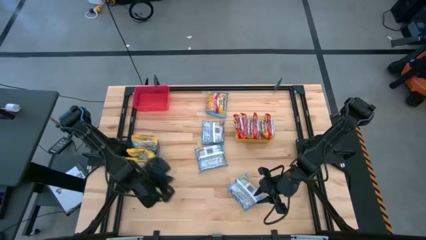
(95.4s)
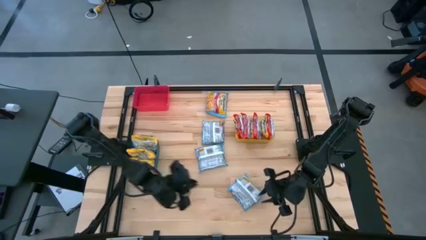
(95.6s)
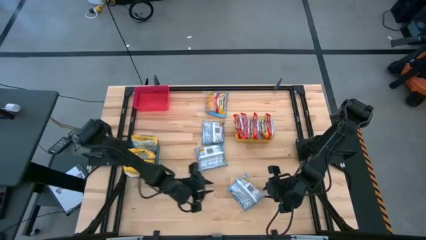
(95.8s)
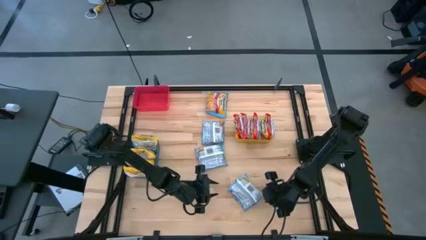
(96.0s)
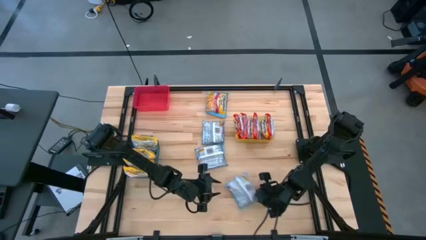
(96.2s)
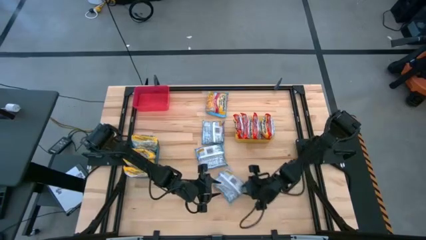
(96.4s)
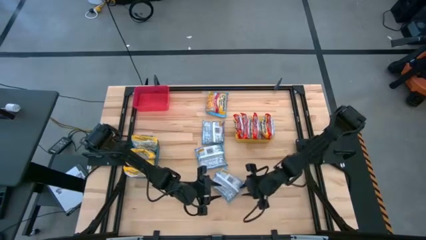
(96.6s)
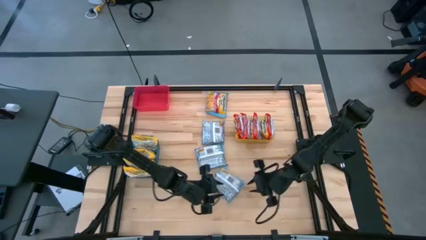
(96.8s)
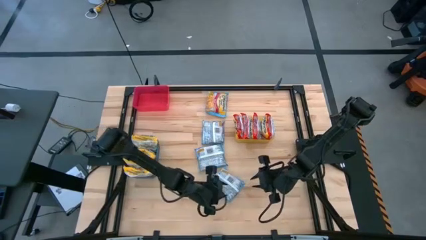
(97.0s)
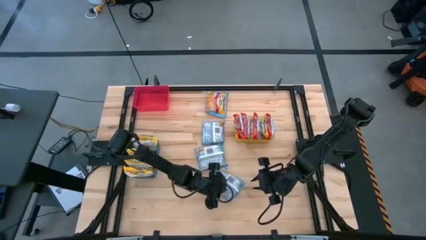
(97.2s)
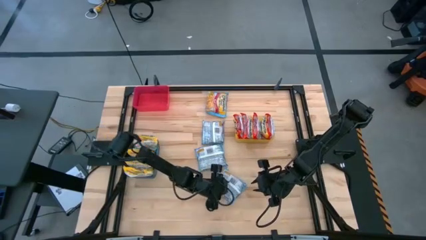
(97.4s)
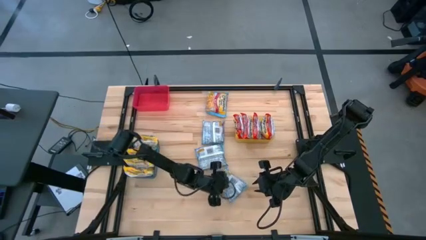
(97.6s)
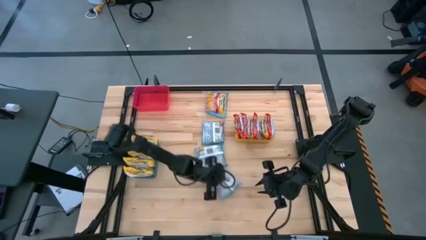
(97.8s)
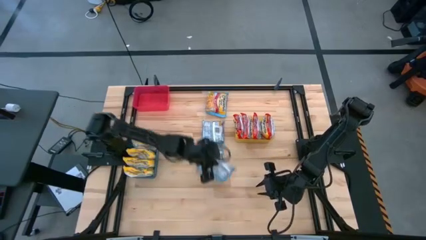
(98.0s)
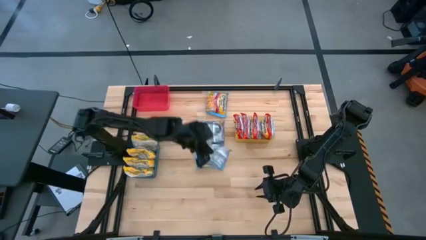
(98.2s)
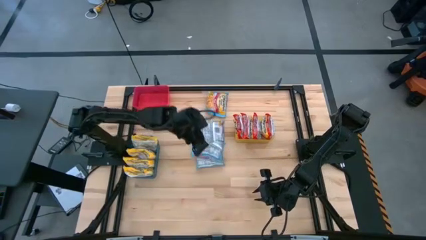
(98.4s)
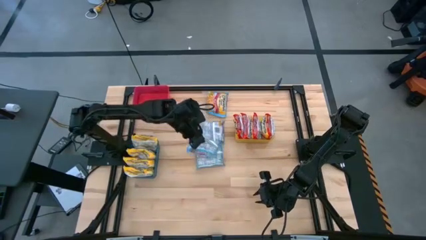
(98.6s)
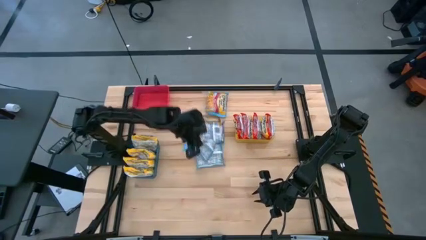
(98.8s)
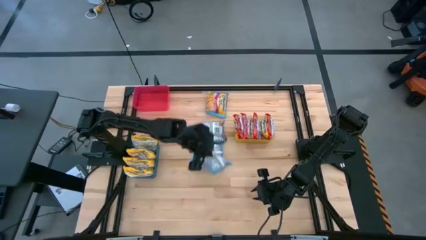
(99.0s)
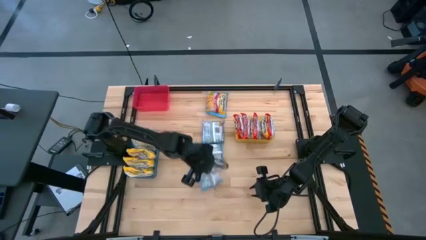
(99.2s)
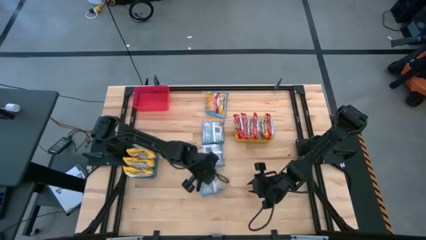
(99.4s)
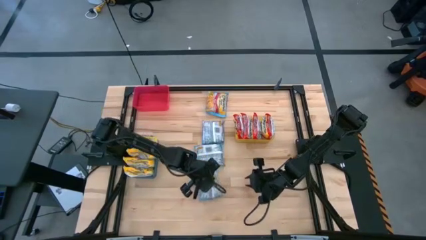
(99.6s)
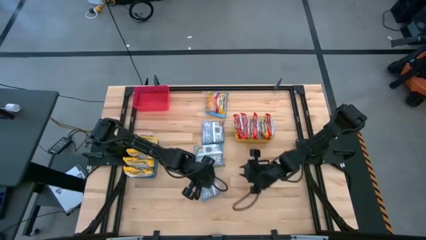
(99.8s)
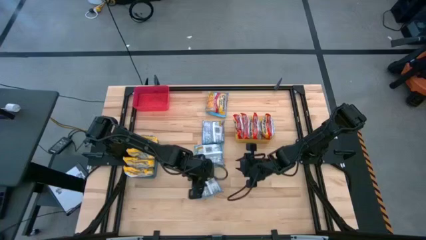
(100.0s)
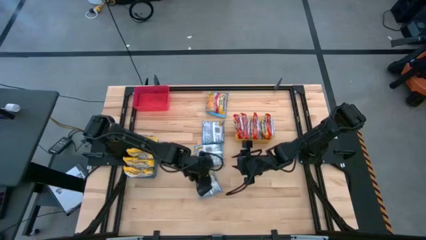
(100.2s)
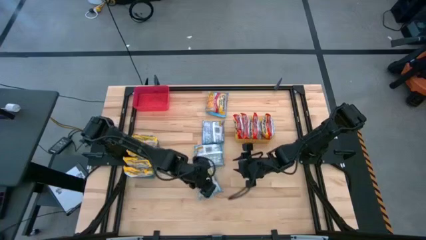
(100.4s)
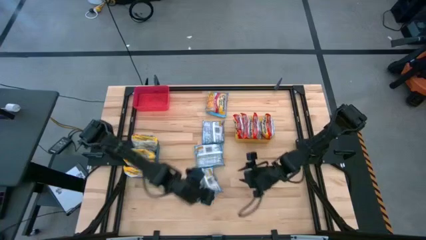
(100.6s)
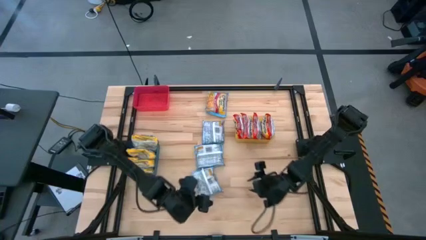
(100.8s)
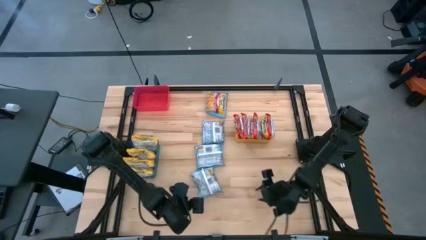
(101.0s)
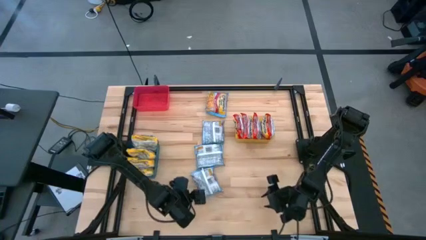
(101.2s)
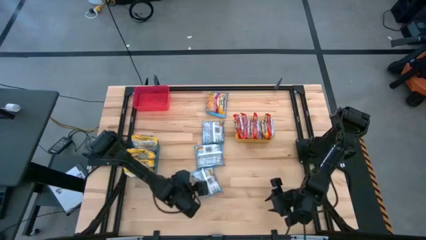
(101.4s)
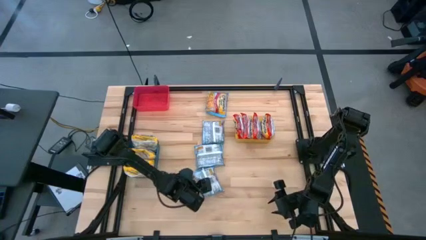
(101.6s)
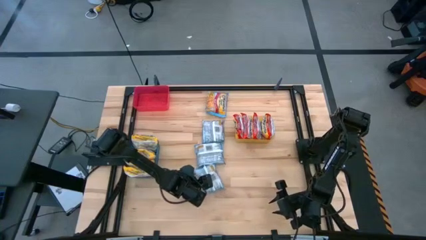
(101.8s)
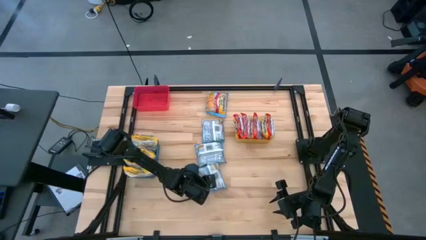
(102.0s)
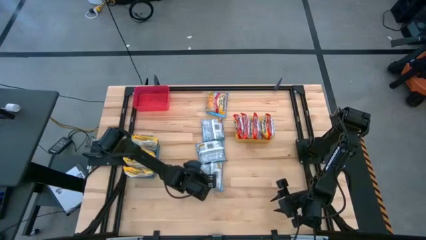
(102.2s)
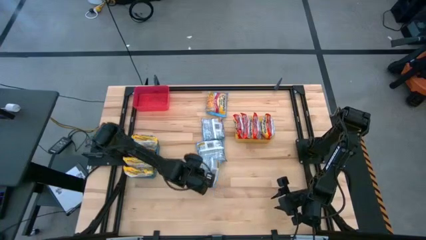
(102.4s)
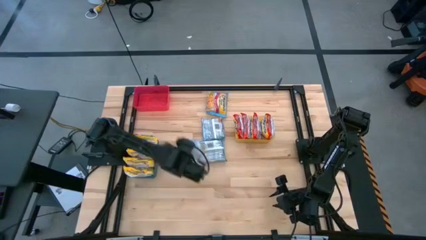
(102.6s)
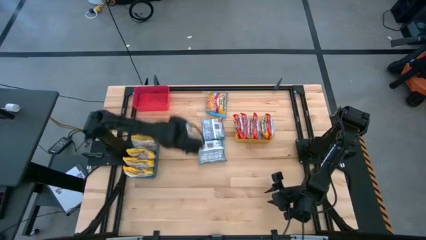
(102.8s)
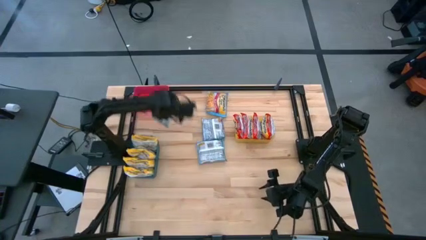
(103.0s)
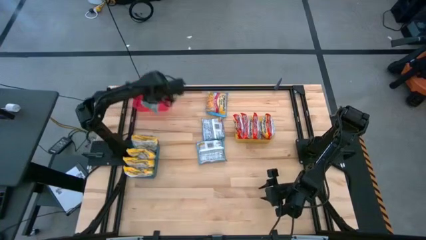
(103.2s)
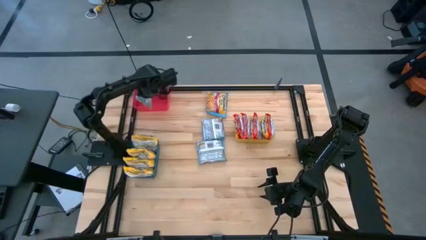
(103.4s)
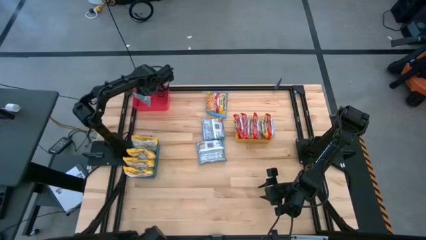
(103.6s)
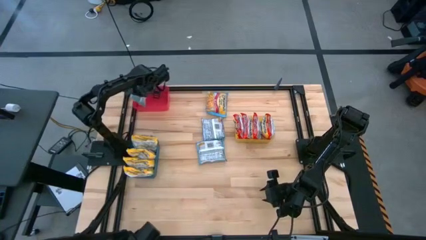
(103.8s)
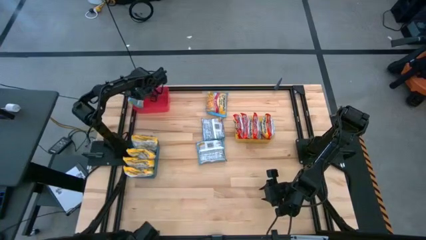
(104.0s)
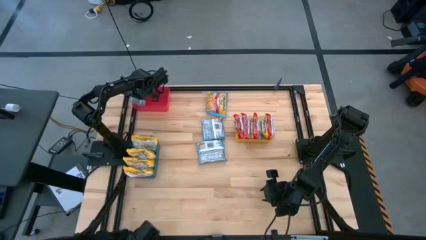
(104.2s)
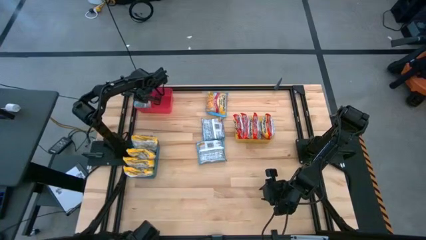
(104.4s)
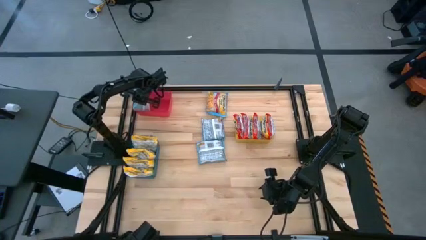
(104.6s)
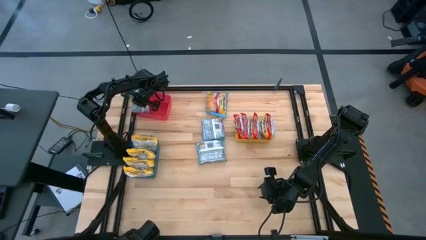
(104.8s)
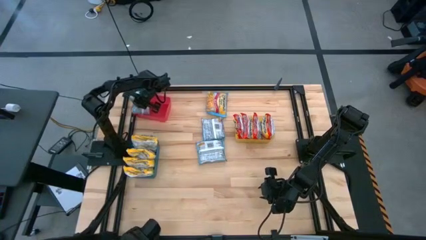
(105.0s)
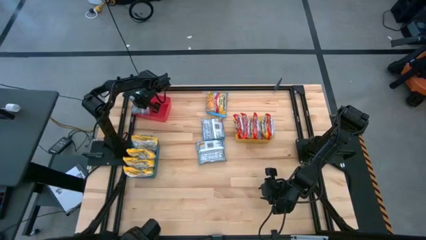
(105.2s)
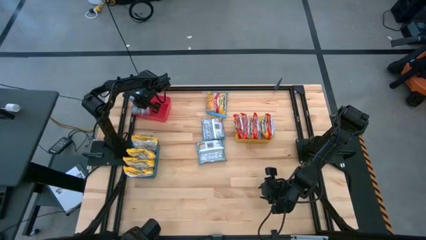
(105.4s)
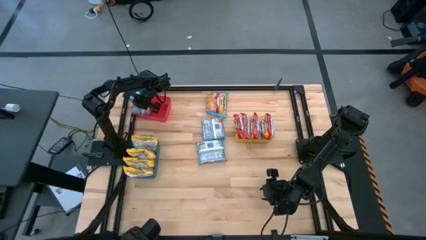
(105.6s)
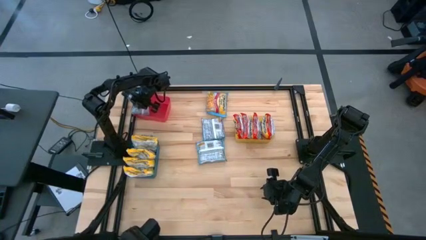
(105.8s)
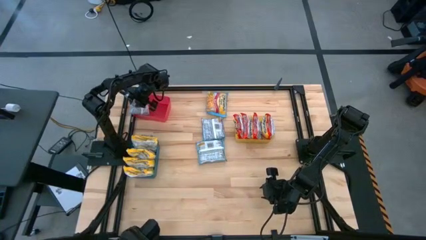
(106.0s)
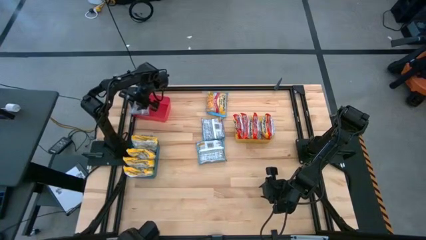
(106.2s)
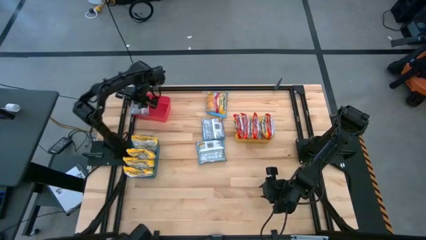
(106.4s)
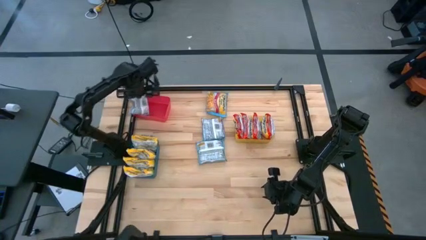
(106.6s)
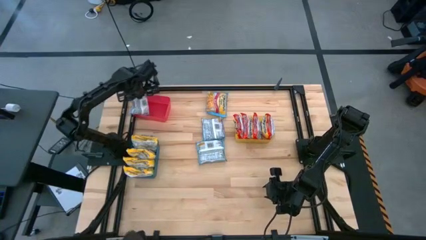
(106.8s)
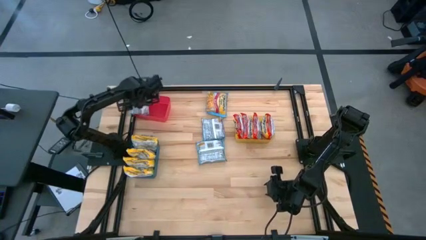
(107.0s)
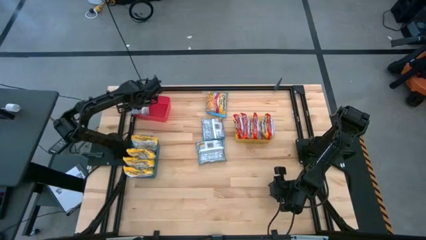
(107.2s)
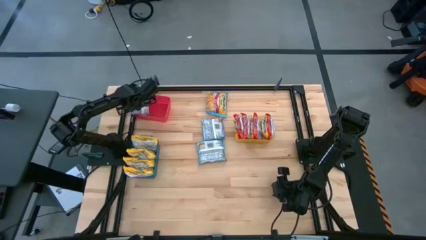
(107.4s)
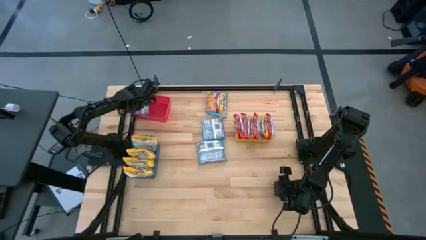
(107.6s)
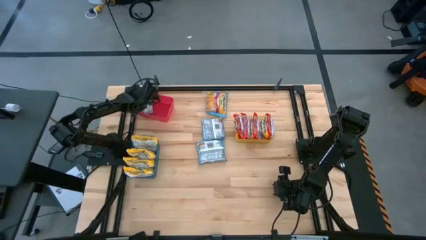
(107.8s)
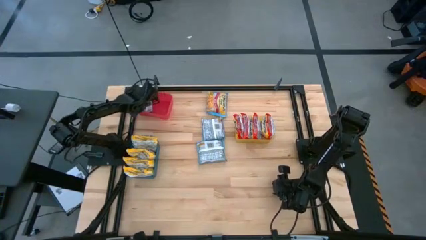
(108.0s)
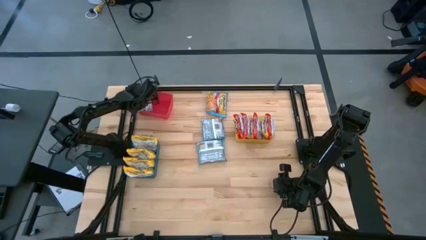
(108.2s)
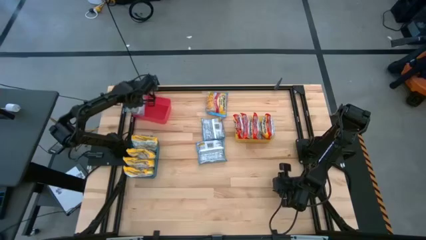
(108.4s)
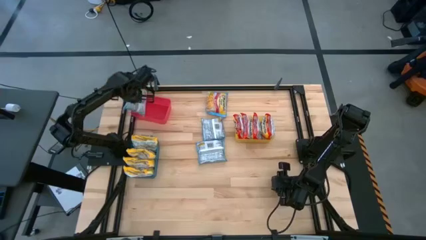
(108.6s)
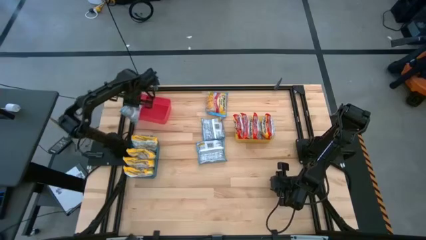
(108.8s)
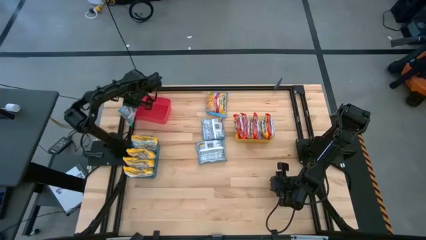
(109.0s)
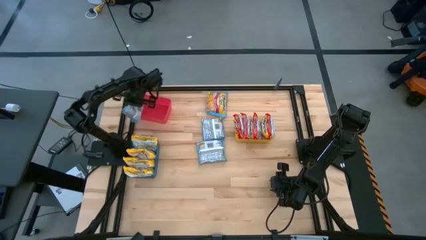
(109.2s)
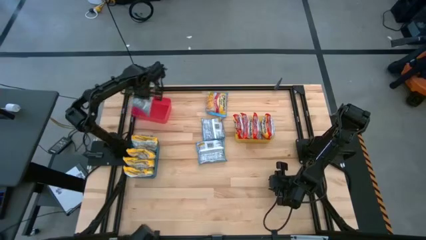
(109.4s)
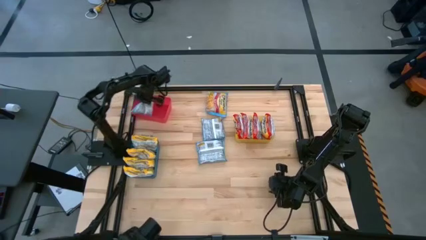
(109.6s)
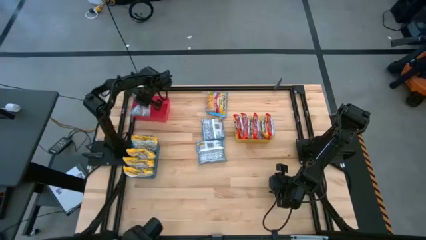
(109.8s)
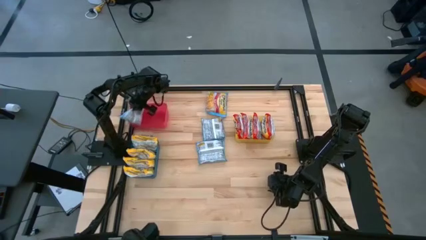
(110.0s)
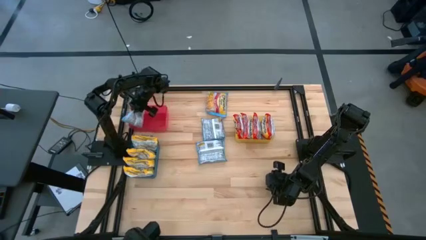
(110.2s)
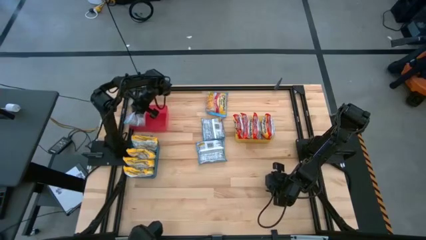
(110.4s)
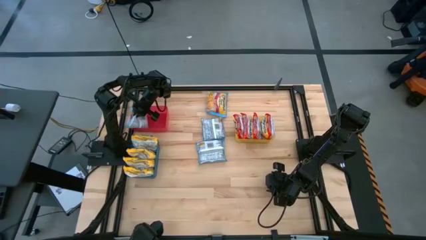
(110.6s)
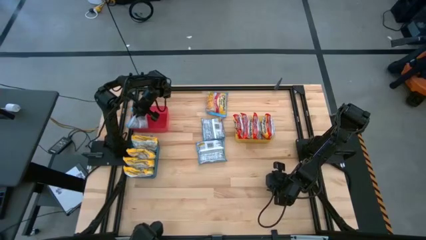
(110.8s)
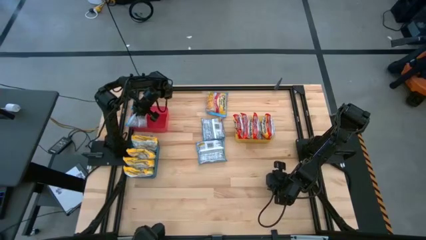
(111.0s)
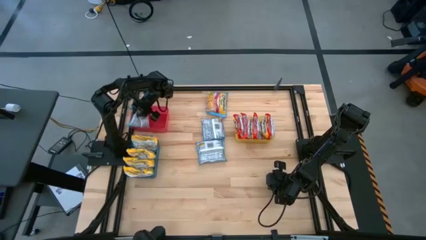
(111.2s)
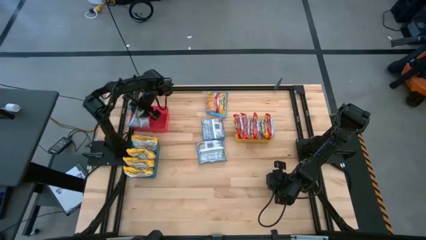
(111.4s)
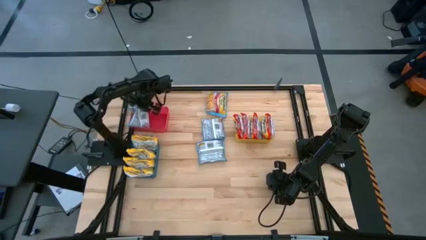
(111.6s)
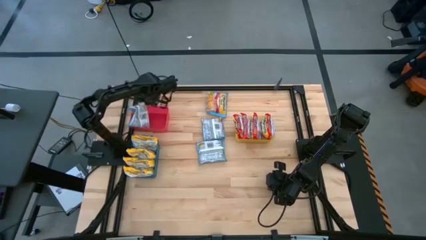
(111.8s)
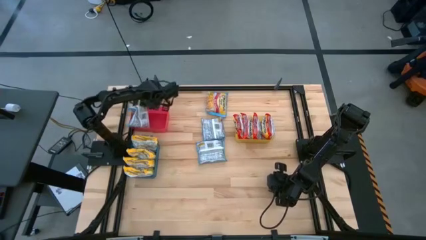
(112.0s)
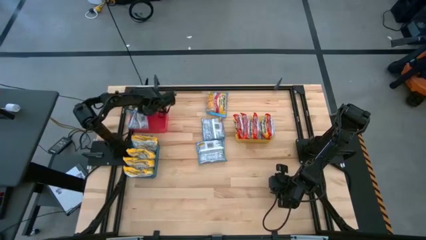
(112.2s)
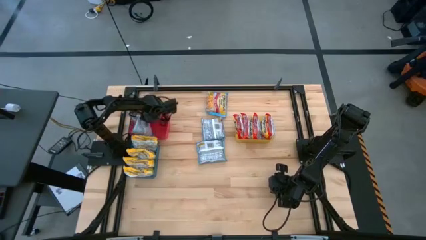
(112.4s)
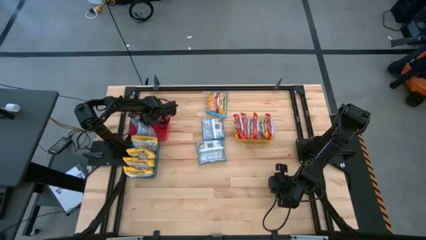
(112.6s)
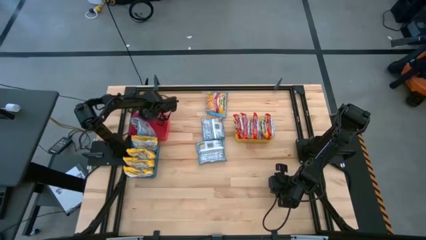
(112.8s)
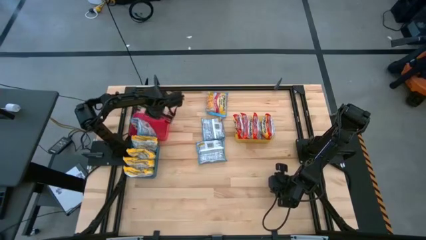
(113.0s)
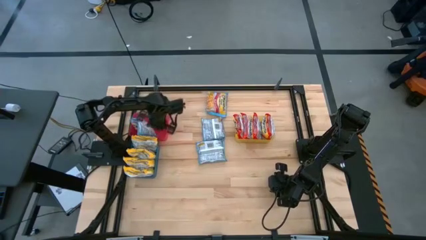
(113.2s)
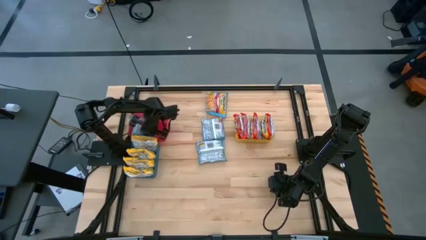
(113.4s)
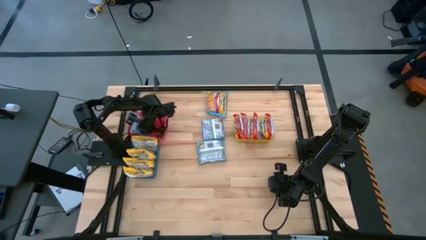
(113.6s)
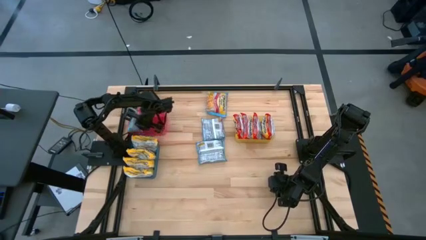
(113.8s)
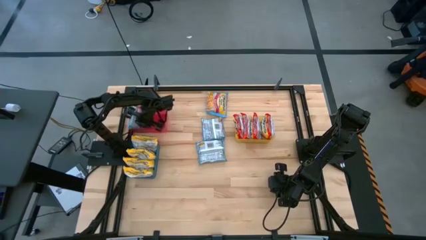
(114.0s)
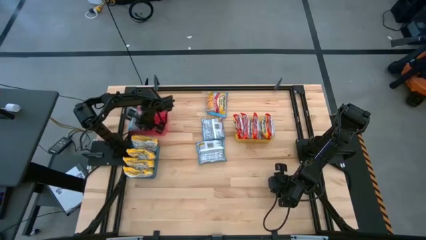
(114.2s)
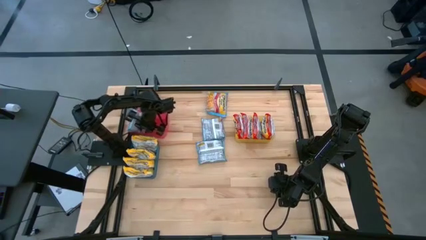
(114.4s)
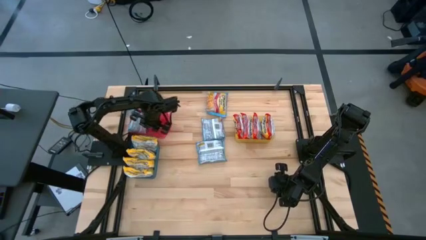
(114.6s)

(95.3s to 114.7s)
Task: Sort Maruchan noodles
Put the blue noodle pack into the red bin
